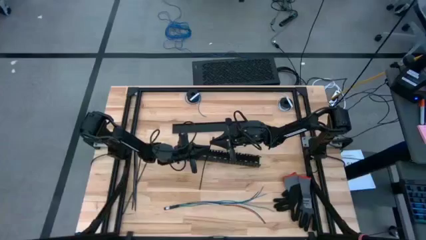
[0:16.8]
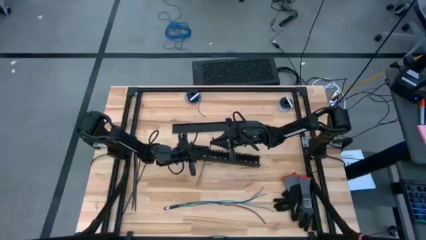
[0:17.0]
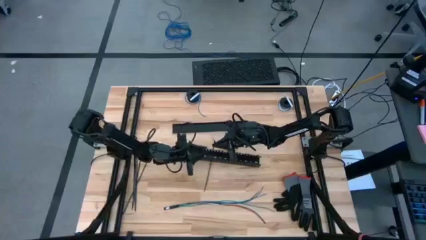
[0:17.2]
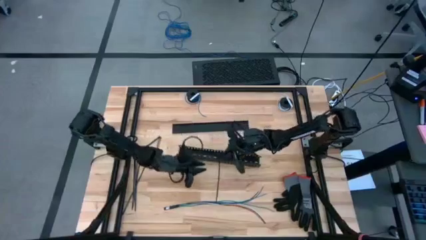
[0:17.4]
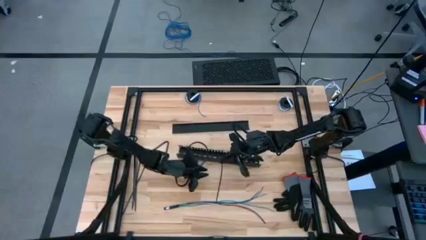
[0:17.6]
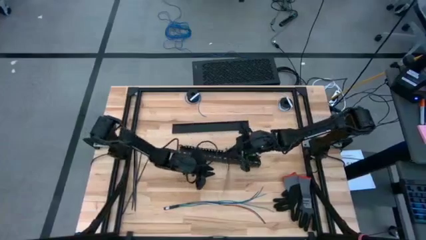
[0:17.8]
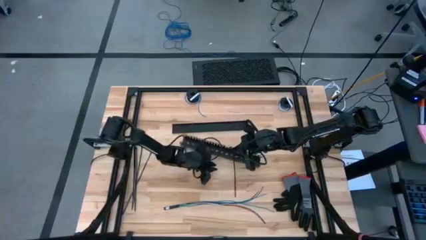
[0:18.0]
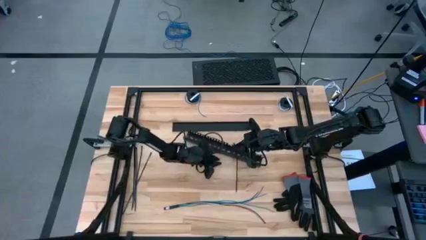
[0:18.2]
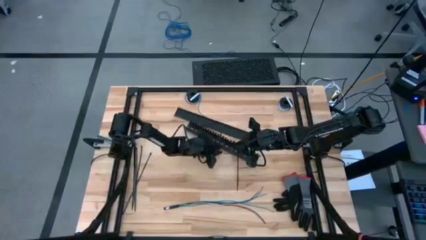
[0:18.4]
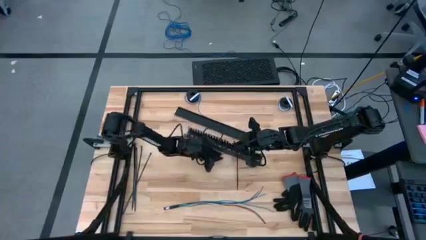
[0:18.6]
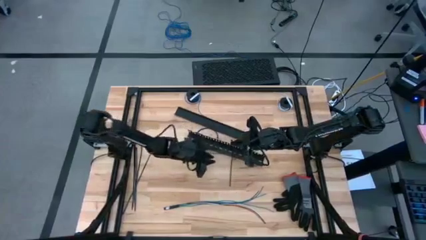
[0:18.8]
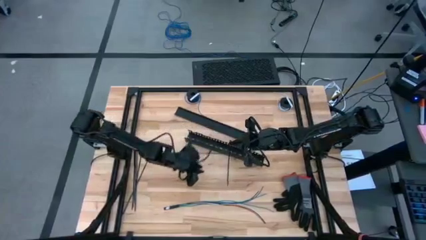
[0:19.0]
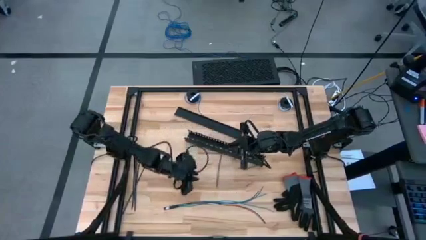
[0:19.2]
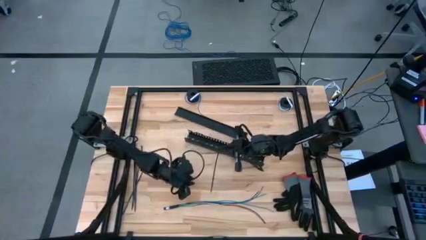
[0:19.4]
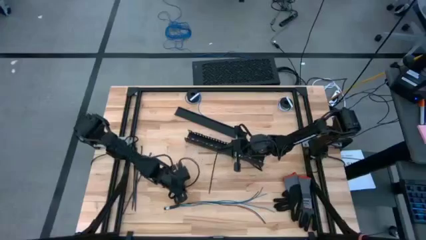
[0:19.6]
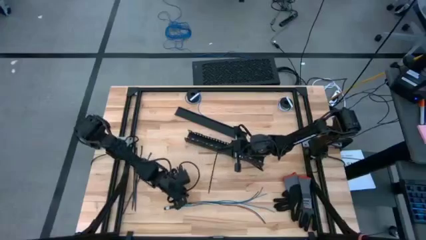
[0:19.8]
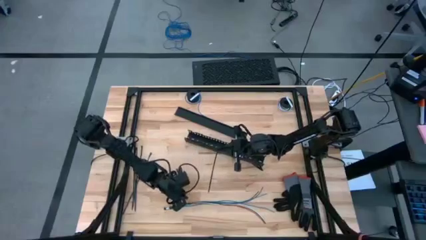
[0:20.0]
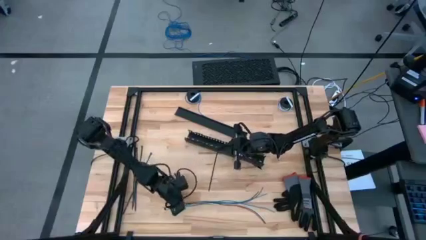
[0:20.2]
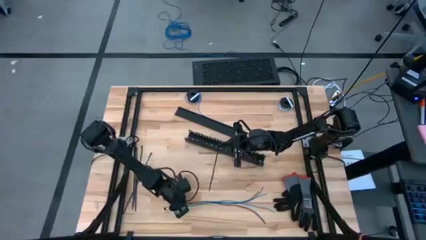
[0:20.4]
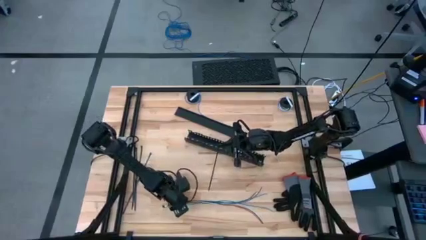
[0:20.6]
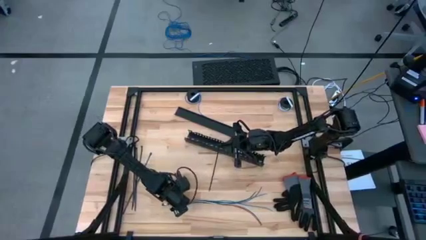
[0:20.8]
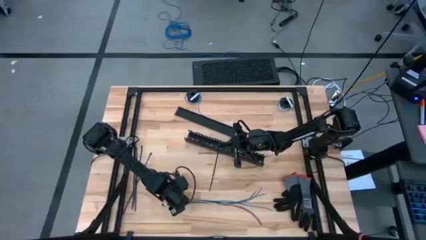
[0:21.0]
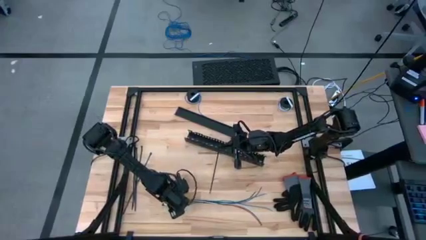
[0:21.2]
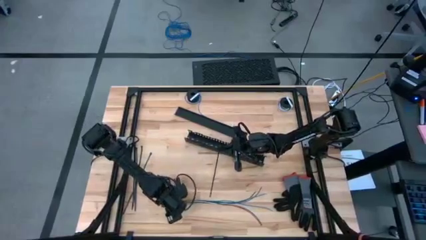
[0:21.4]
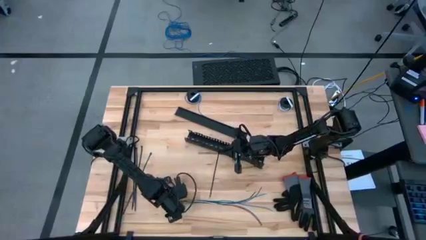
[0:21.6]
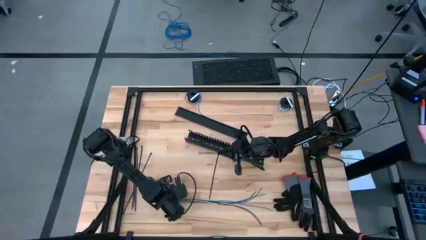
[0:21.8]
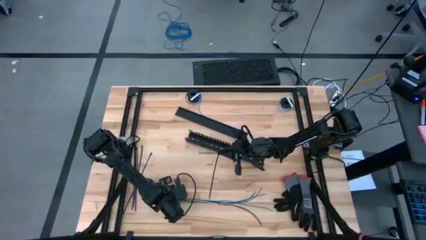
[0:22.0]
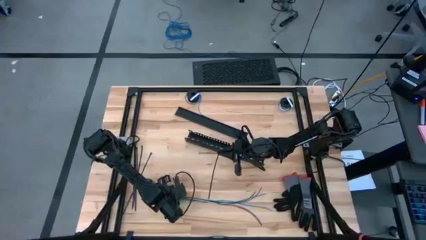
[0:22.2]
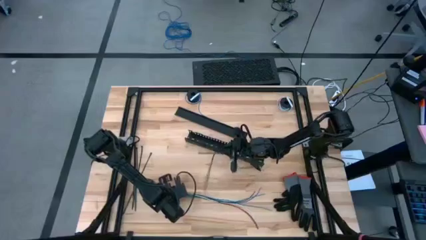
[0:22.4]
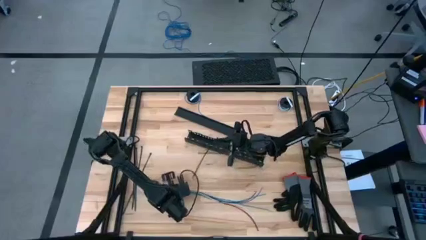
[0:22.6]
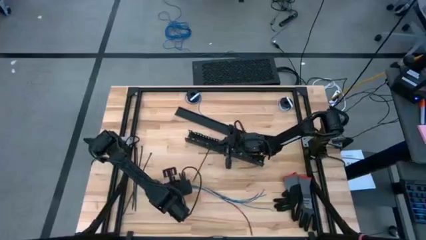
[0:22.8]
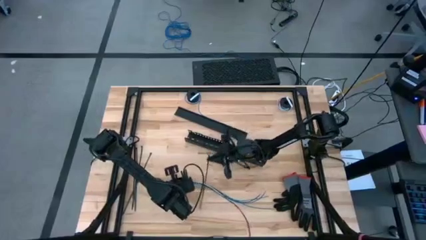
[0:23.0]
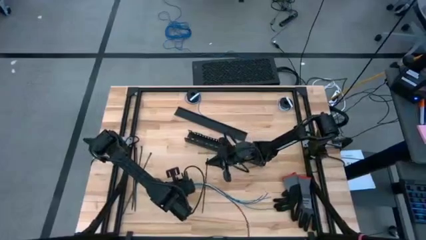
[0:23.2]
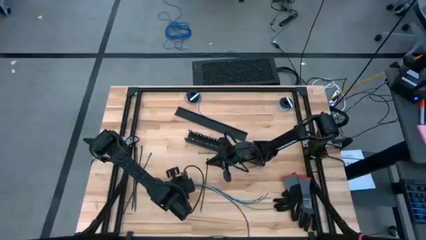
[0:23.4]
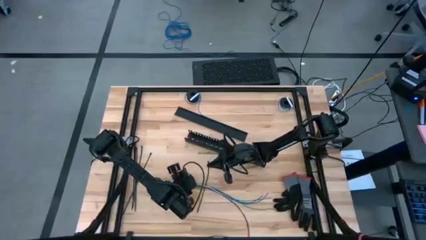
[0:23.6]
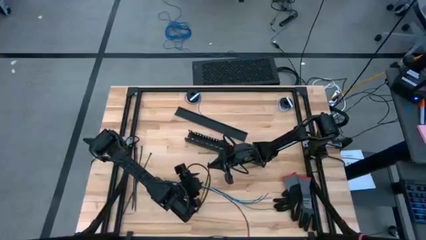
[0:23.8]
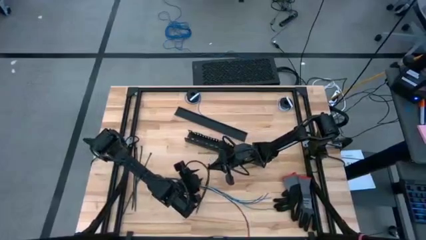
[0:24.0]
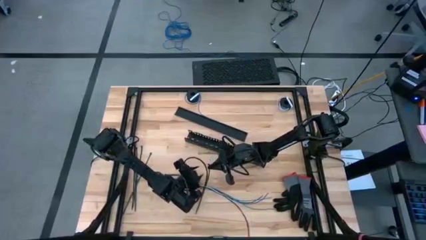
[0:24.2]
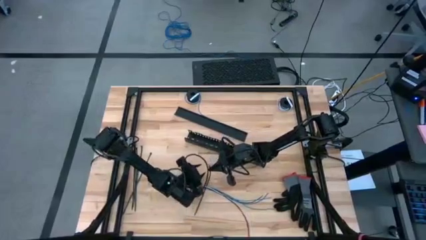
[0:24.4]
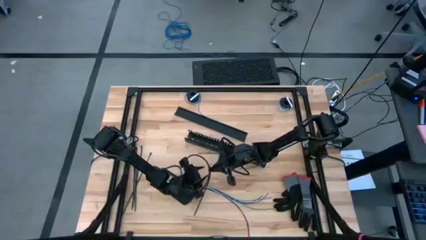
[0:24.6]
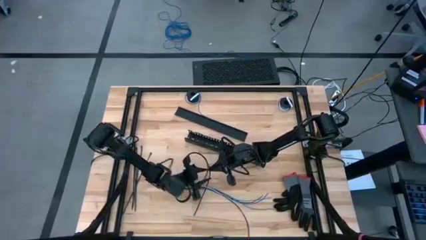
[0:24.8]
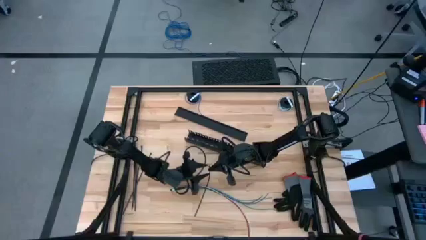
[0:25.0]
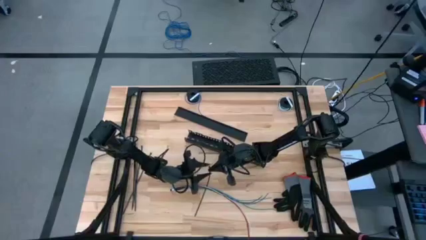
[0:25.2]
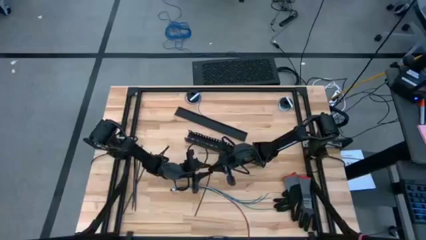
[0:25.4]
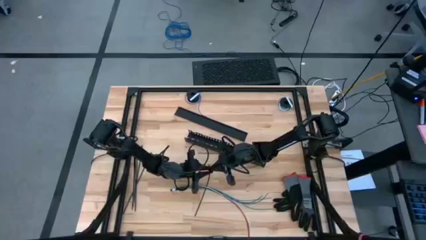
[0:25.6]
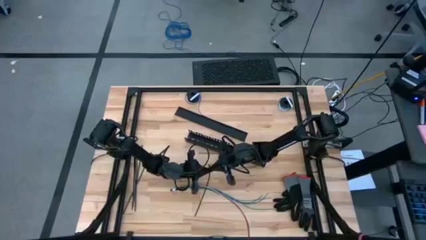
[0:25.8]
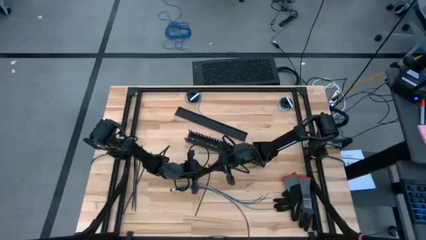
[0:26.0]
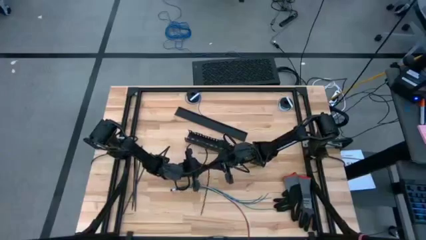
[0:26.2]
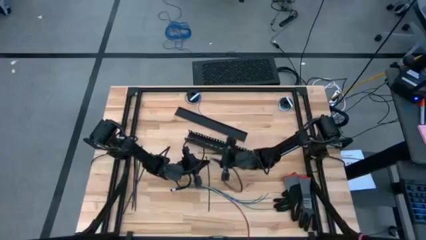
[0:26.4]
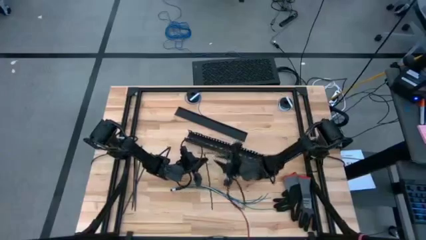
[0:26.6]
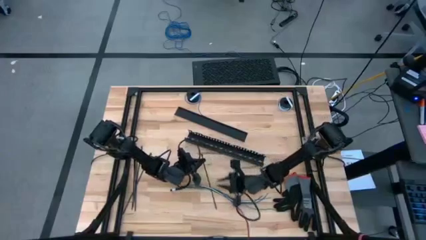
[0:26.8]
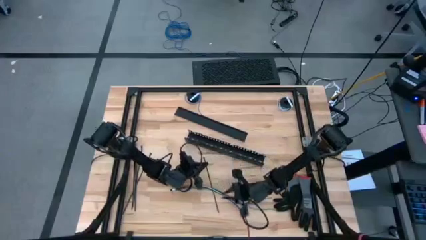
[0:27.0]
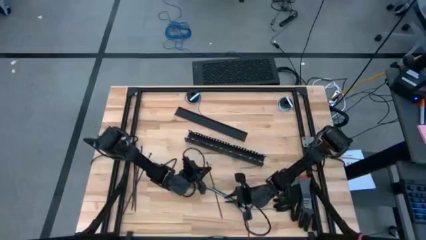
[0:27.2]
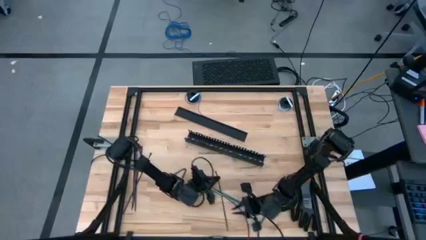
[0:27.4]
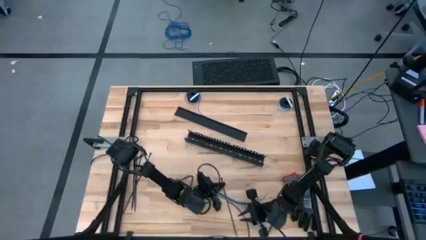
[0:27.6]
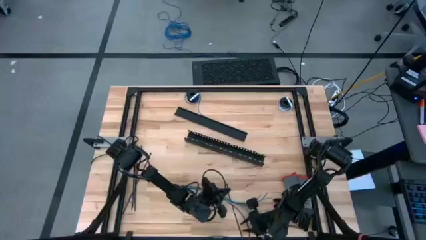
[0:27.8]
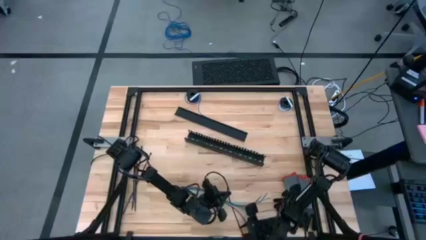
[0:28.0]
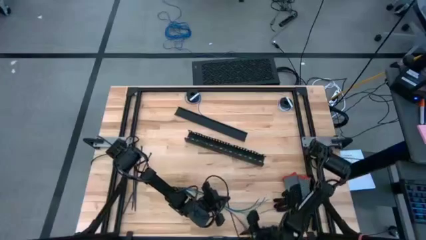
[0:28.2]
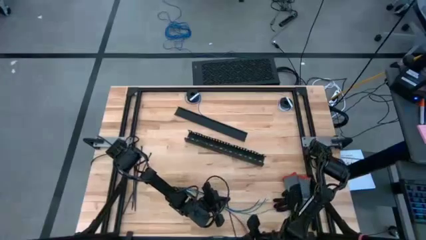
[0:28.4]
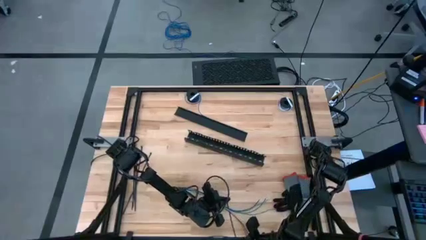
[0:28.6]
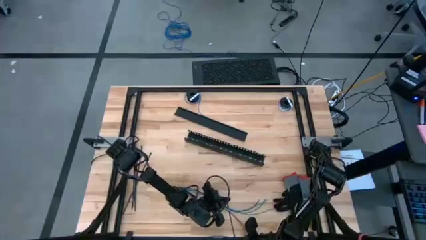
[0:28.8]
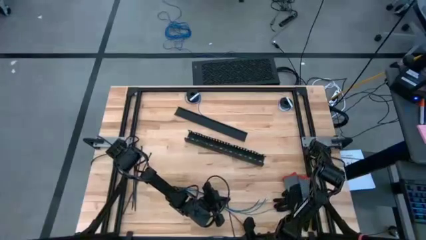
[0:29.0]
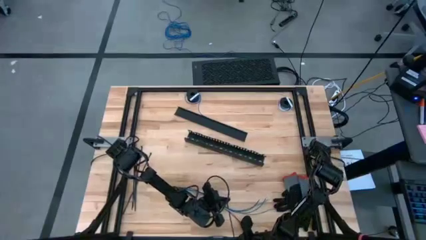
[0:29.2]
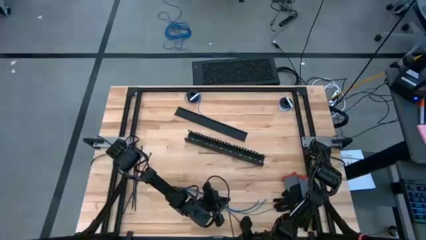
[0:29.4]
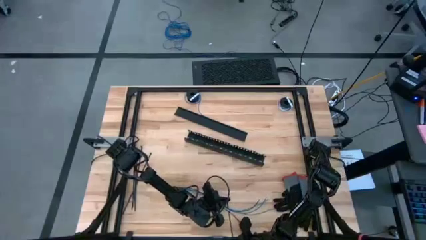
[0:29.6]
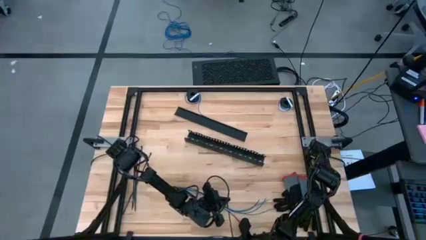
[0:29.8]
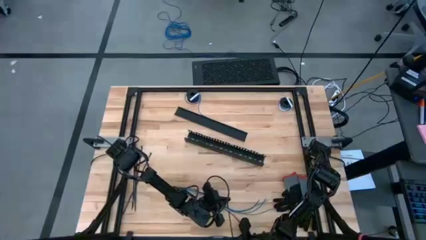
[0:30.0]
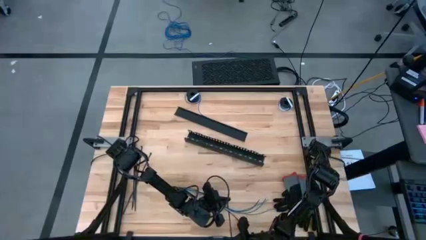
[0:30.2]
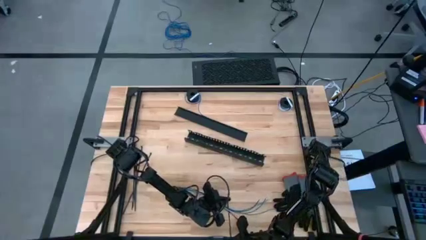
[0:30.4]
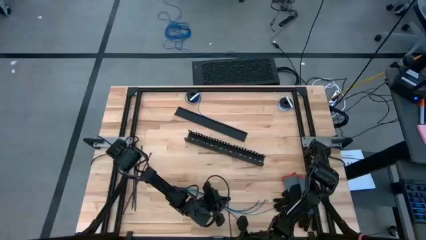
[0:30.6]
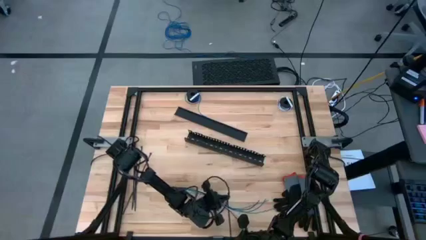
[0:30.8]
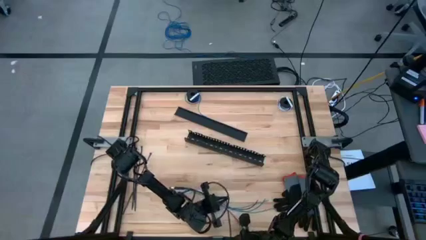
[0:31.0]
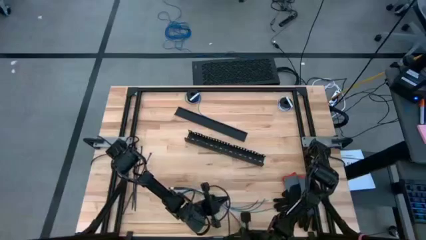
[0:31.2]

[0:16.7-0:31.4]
Task: Ziptie cables
Wrap the cable wires with the black zip tie
